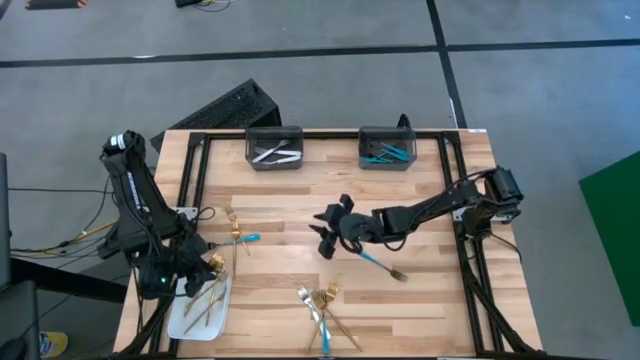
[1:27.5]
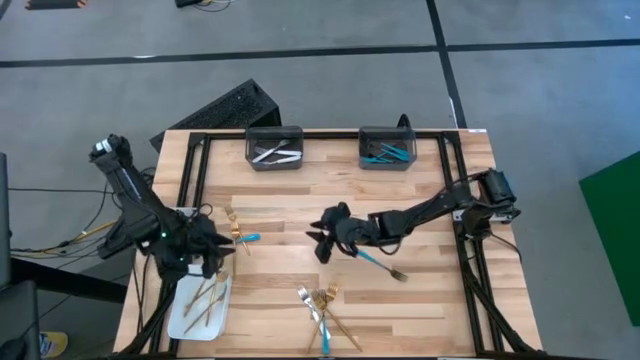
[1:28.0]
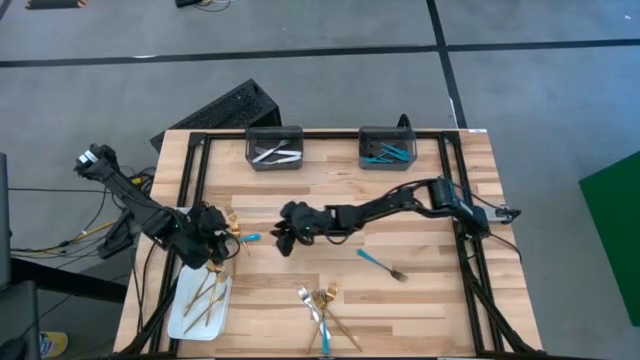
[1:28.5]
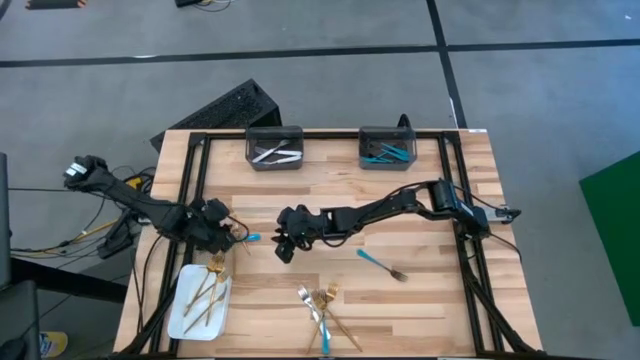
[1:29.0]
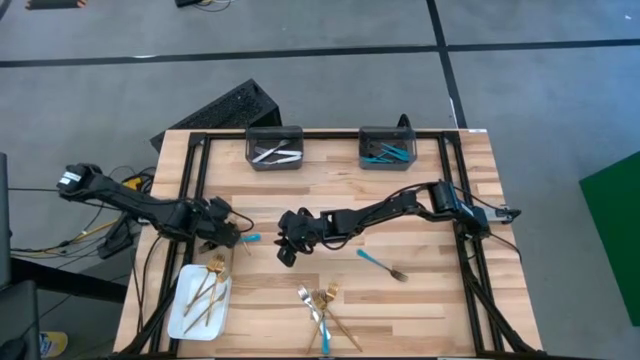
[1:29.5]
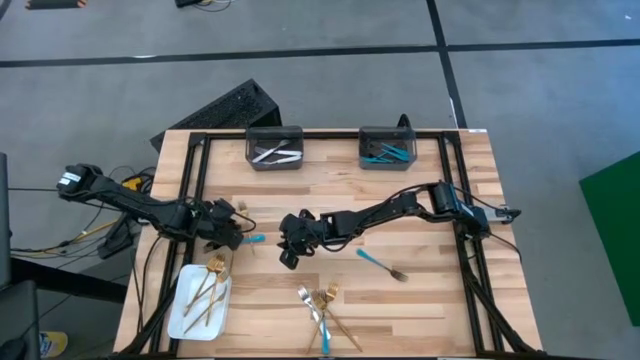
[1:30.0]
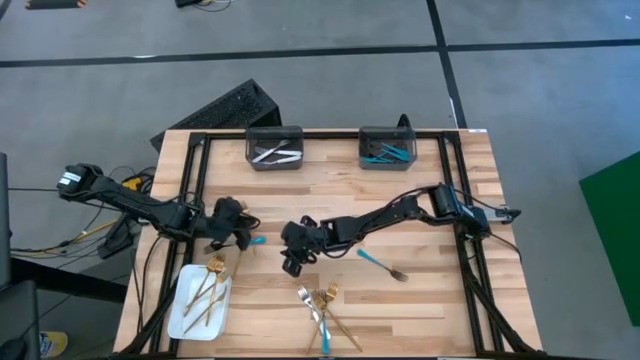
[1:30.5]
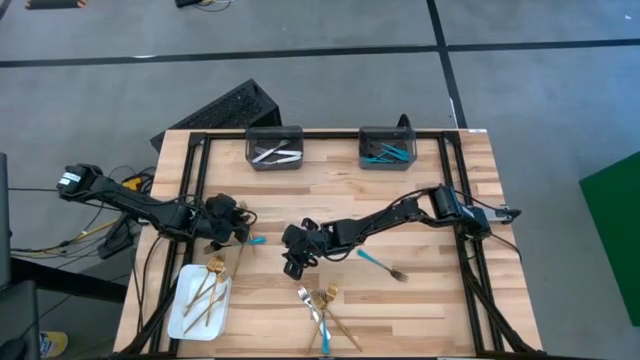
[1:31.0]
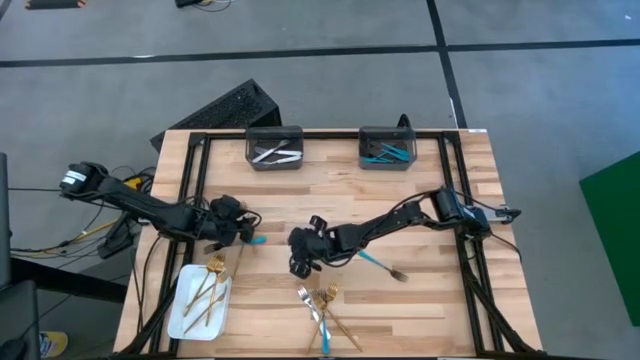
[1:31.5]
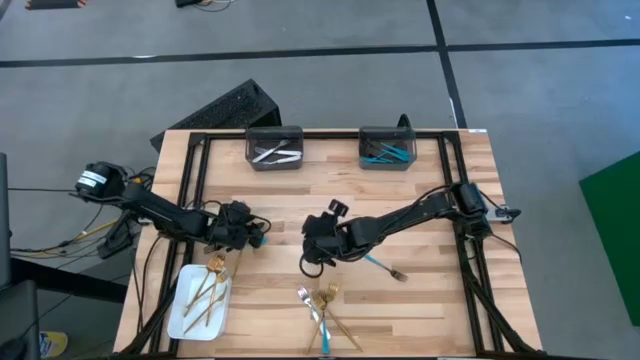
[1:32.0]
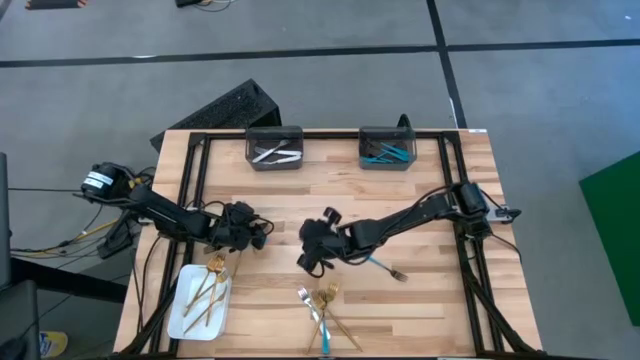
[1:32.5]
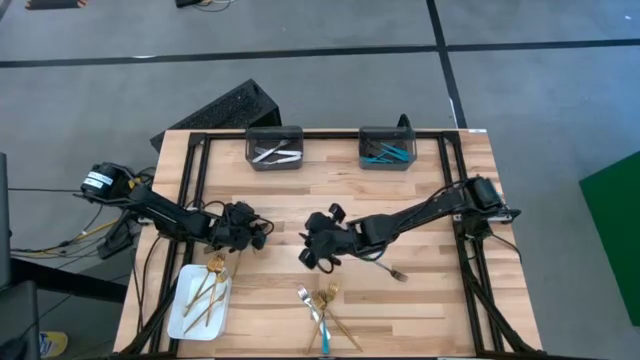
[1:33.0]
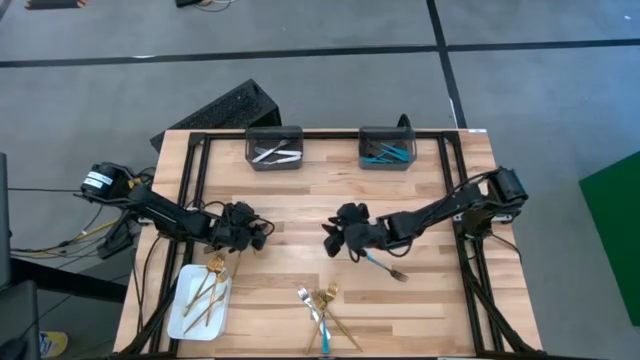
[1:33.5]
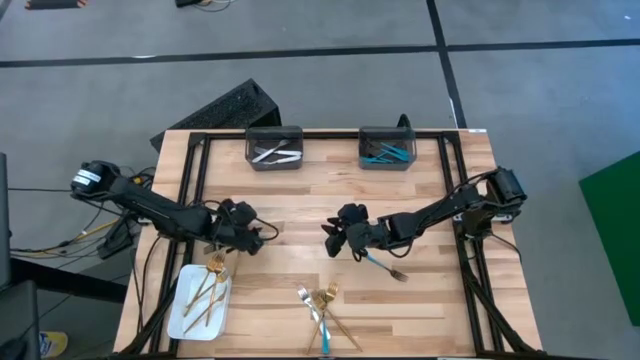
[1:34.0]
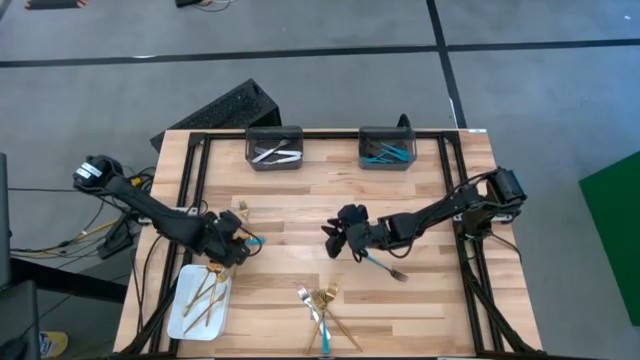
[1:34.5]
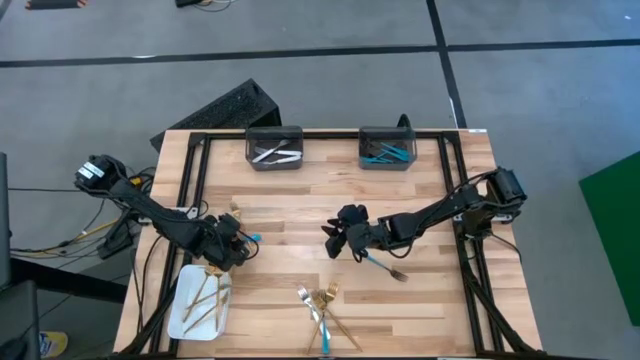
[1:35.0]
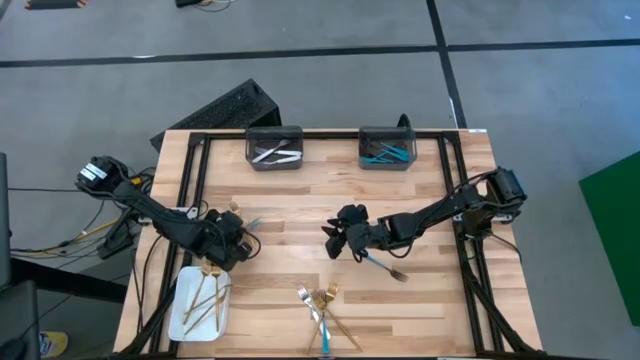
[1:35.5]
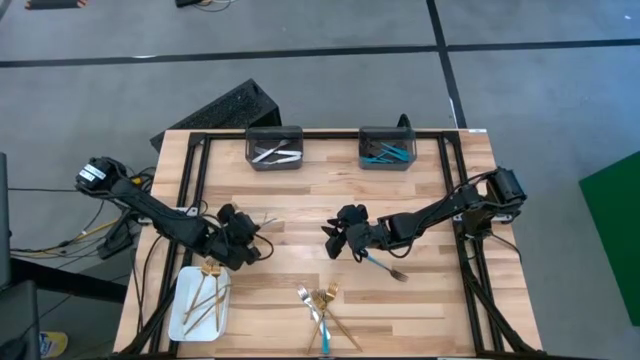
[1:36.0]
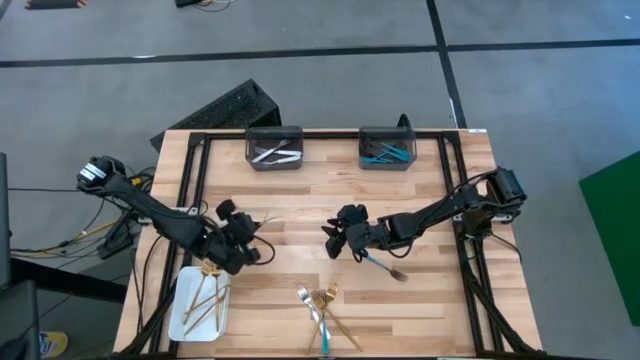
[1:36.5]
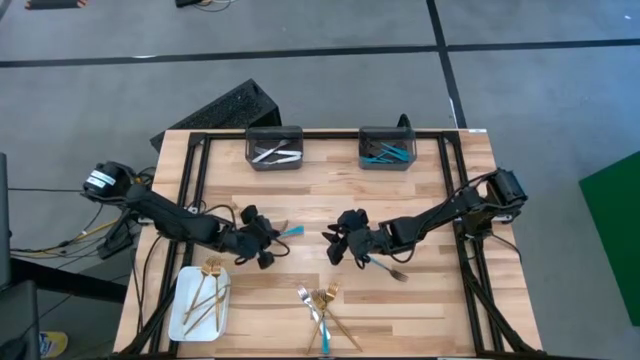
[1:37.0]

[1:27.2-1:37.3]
Task: Sort silverware by color (type)
Put the gold fork into the white bin

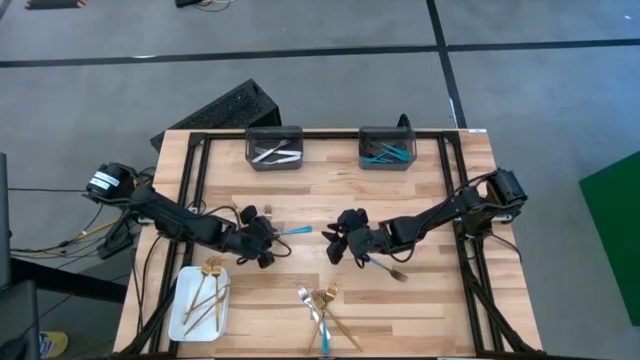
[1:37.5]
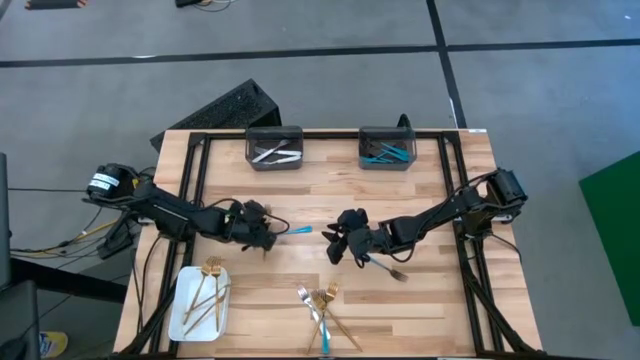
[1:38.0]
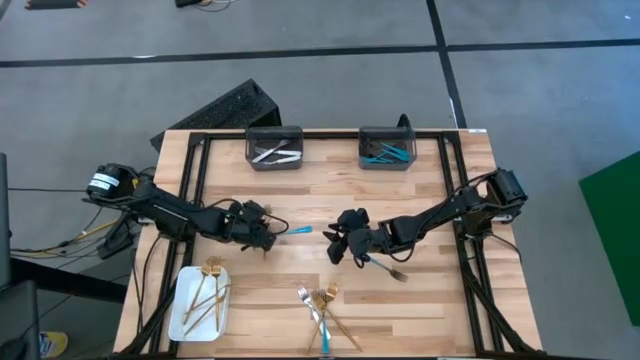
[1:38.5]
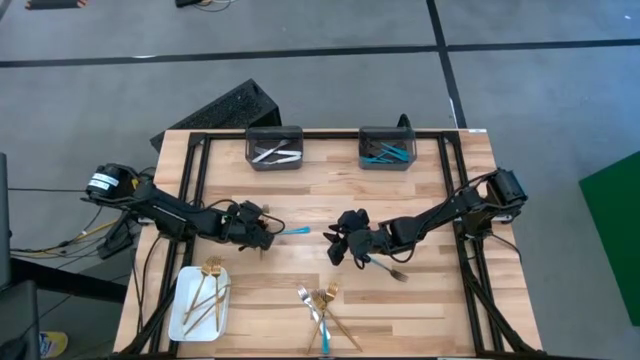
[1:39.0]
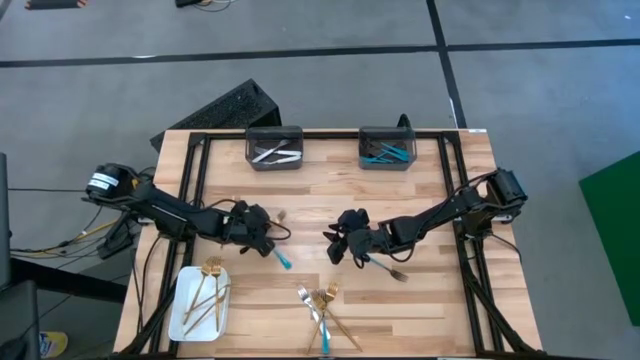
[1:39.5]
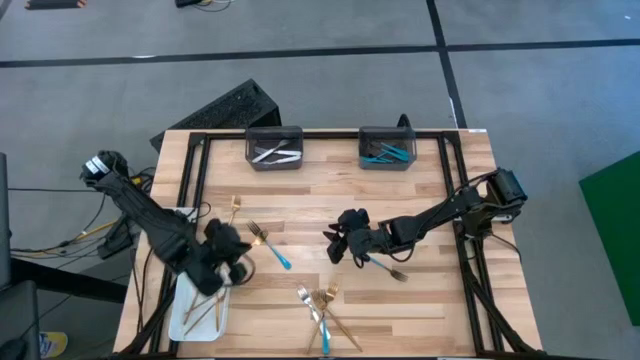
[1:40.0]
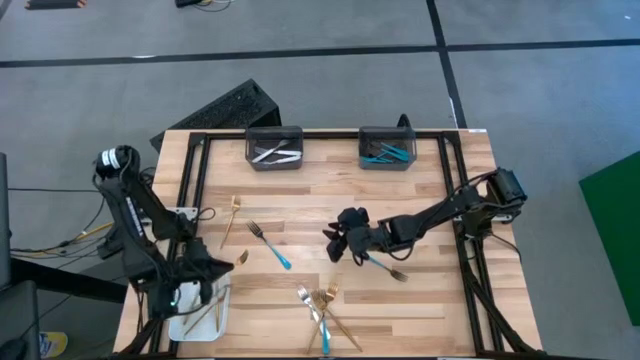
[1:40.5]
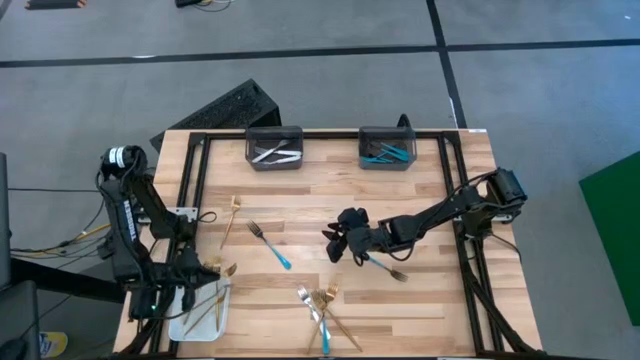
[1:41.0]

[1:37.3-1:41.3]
Put the gold fork into the white bin

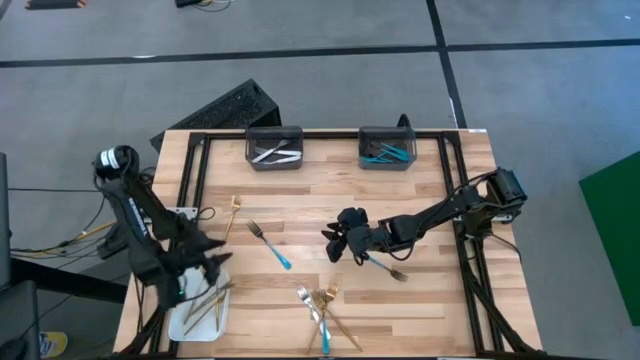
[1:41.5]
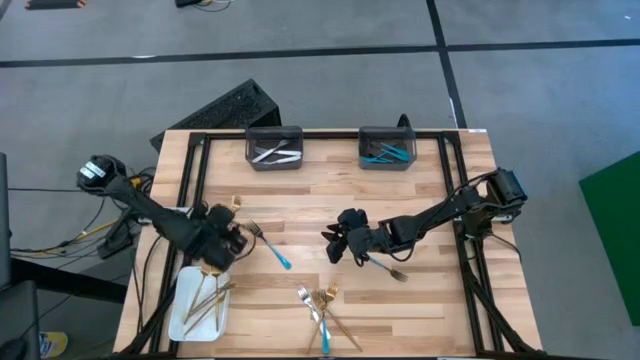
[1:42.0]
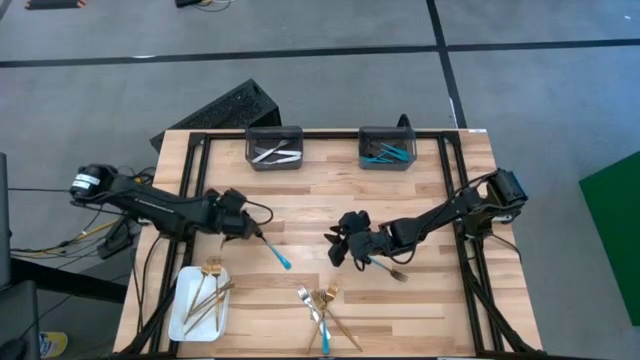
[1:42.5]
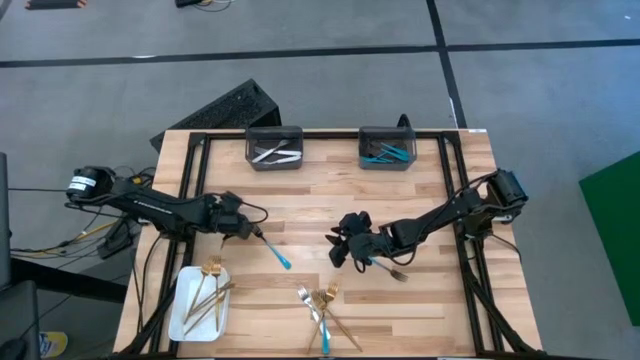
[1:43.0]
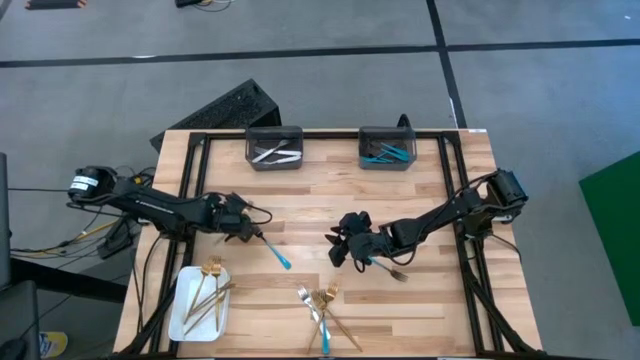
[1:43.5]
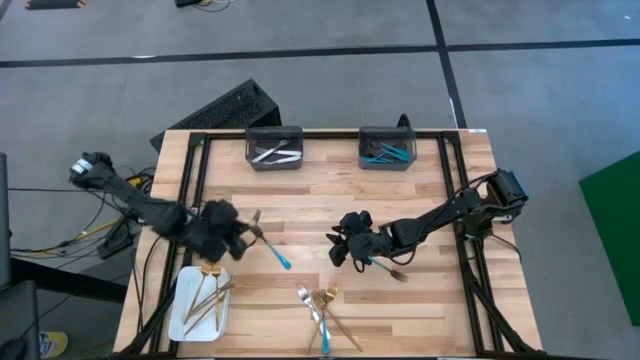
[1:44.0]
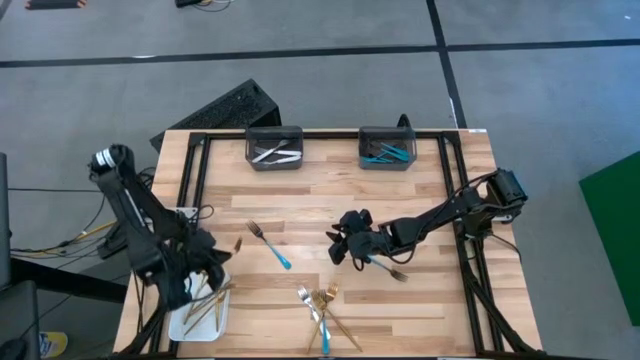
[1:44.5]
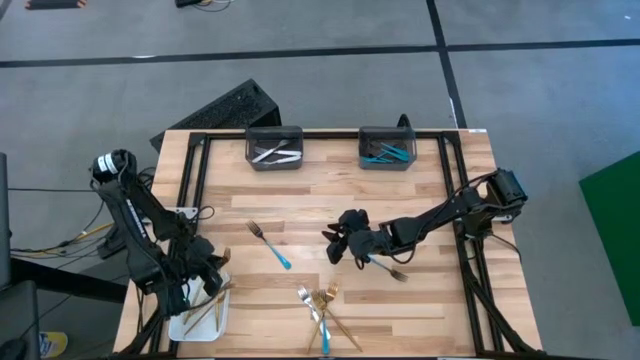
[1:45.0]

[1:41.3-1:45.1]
Put the gold fork into the white bin

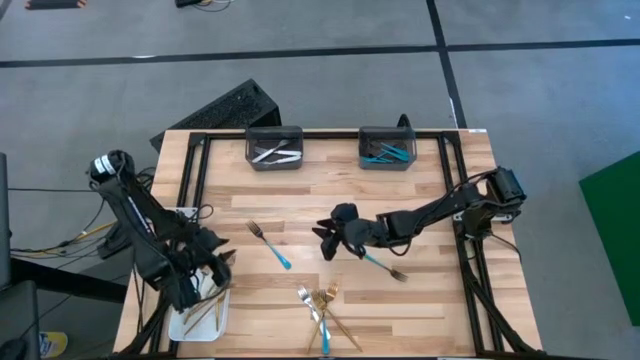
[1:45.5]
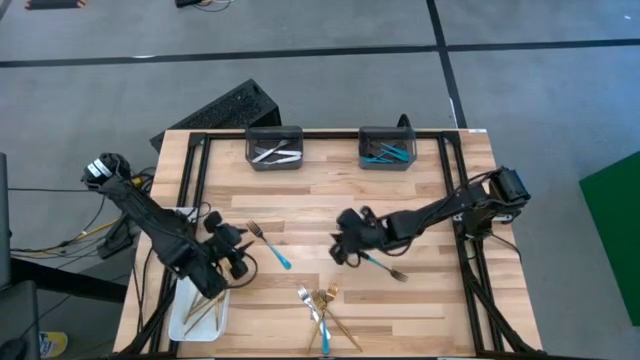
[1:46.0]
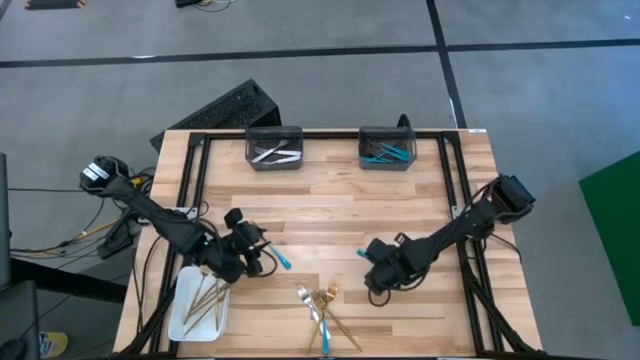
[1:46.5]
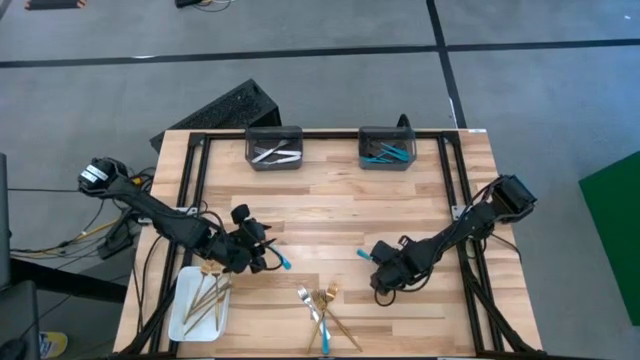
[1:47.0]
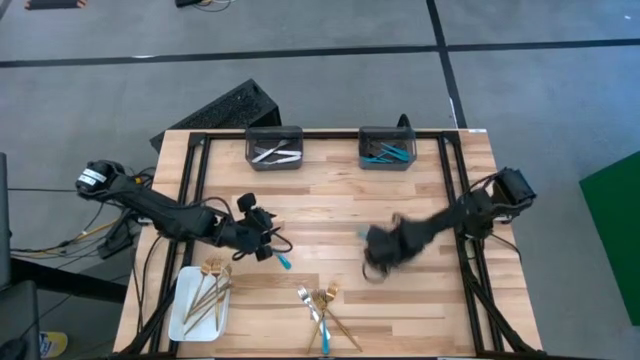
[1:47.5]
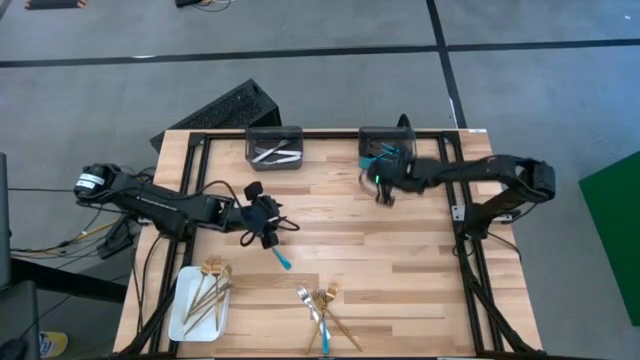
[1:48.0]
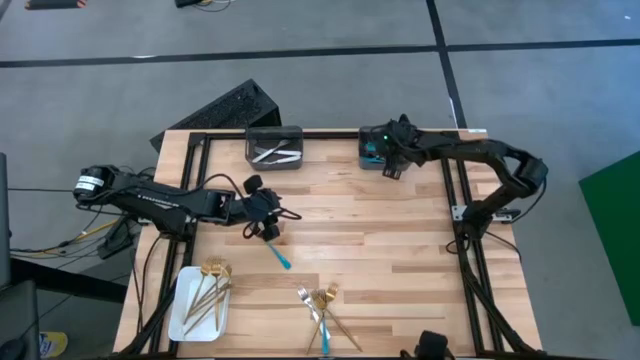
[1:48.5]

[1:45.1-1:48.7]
Put the blue fork into the right black bin
